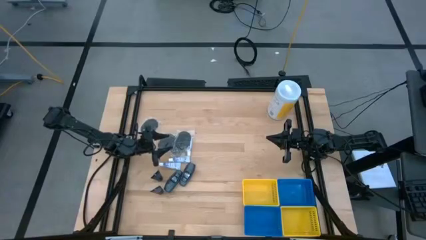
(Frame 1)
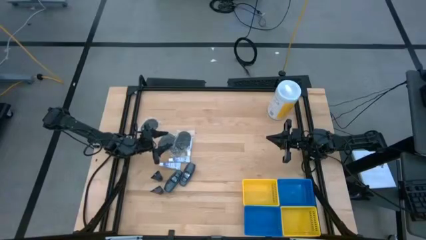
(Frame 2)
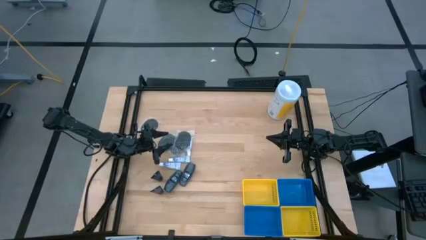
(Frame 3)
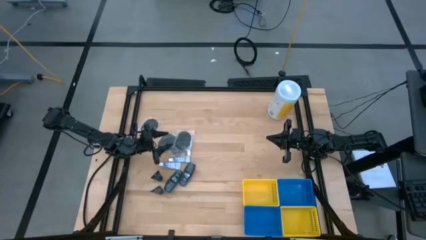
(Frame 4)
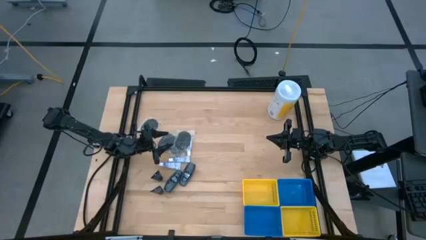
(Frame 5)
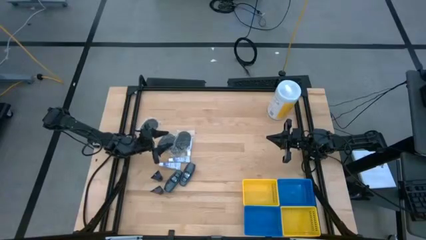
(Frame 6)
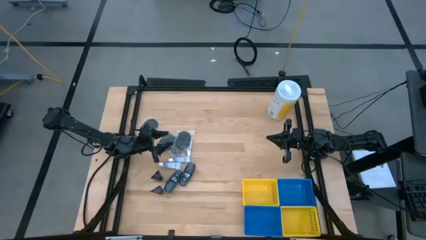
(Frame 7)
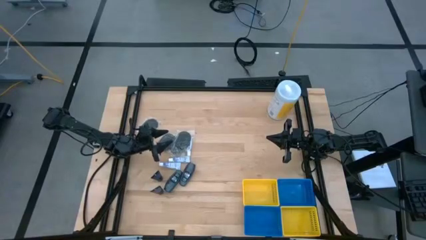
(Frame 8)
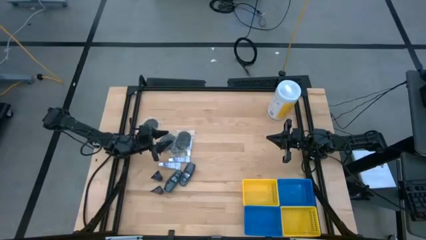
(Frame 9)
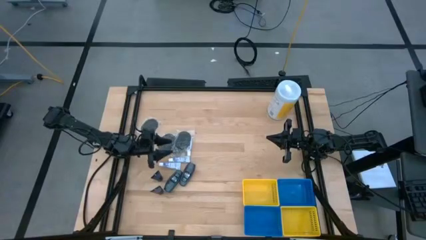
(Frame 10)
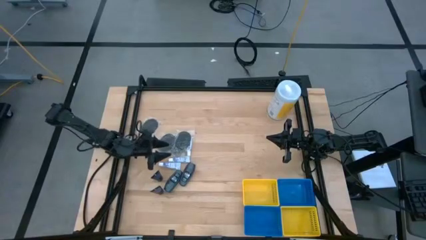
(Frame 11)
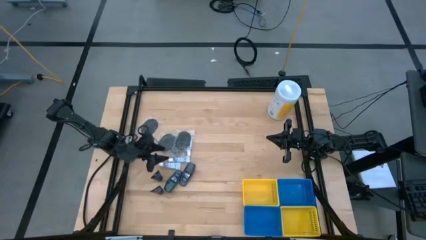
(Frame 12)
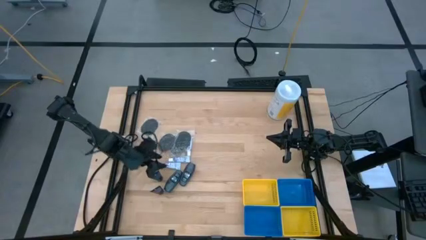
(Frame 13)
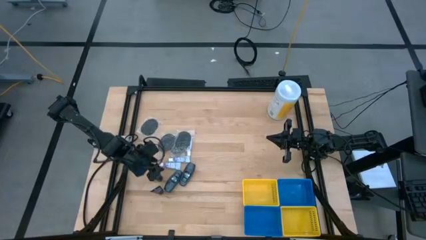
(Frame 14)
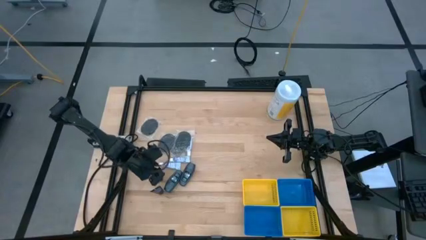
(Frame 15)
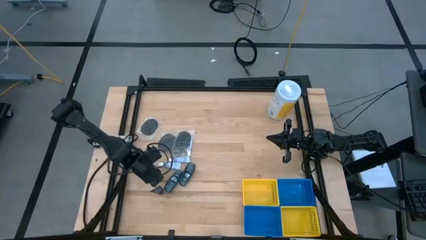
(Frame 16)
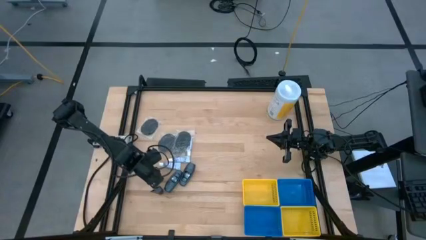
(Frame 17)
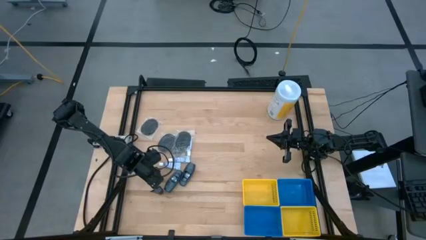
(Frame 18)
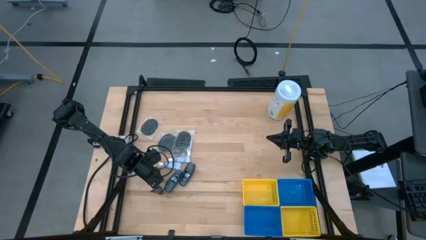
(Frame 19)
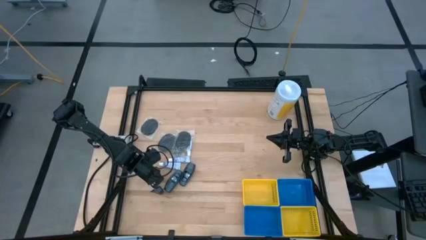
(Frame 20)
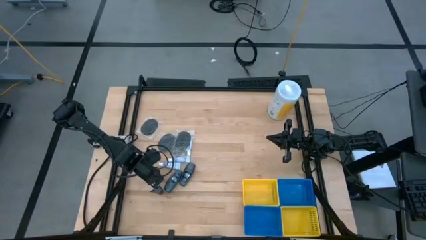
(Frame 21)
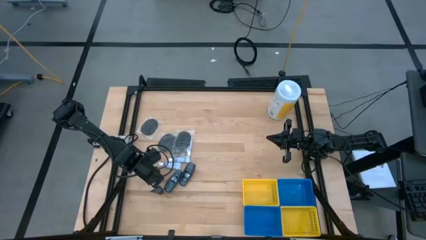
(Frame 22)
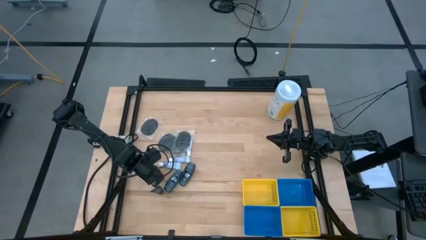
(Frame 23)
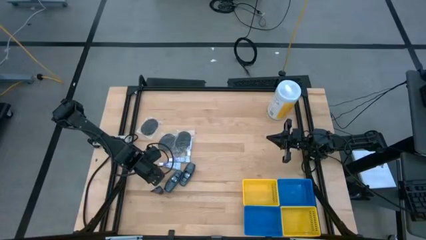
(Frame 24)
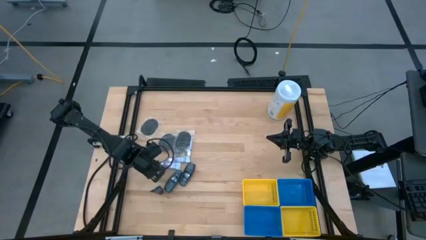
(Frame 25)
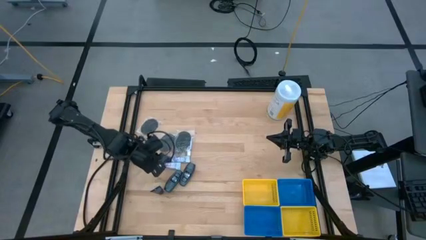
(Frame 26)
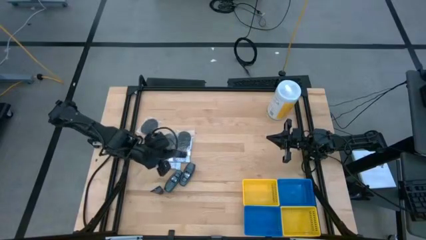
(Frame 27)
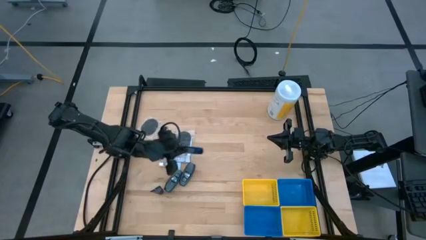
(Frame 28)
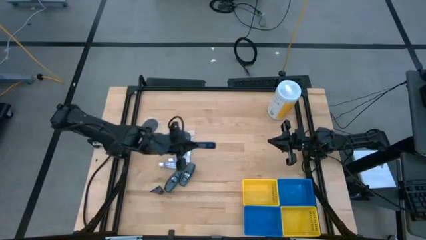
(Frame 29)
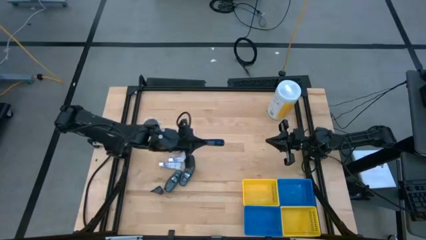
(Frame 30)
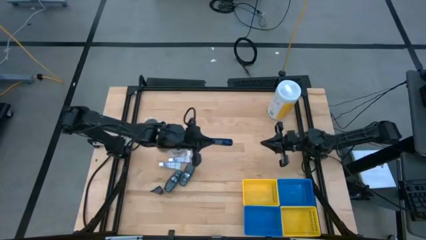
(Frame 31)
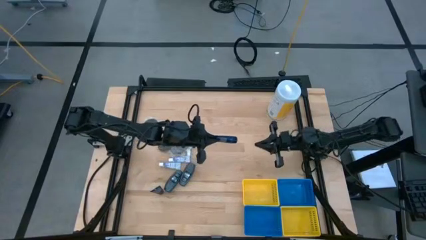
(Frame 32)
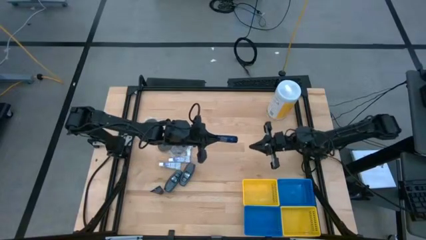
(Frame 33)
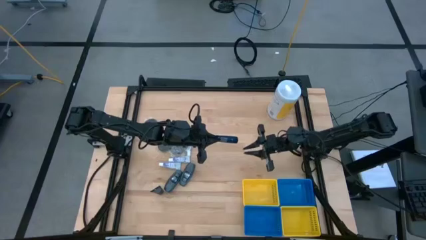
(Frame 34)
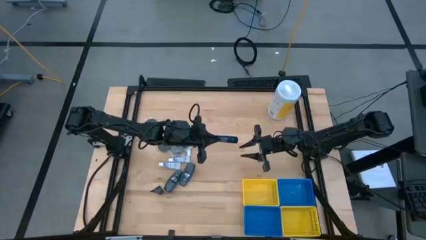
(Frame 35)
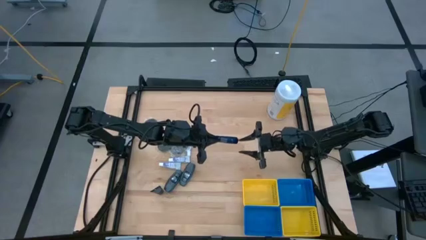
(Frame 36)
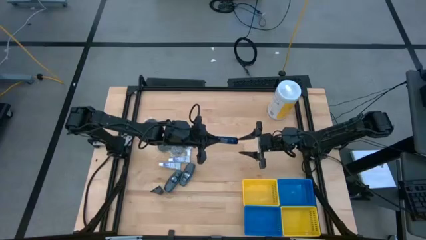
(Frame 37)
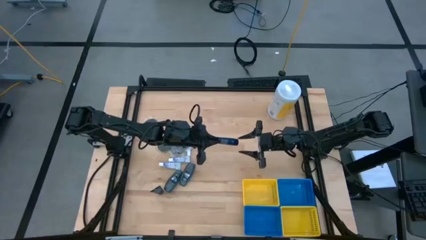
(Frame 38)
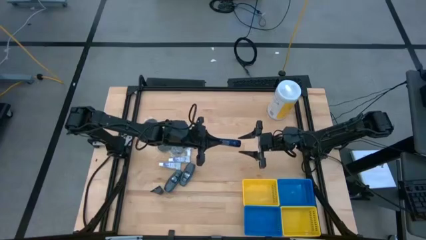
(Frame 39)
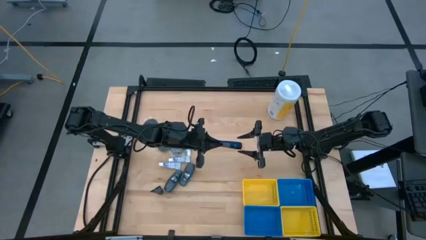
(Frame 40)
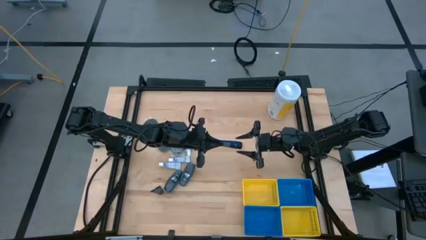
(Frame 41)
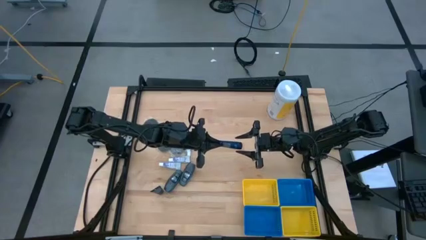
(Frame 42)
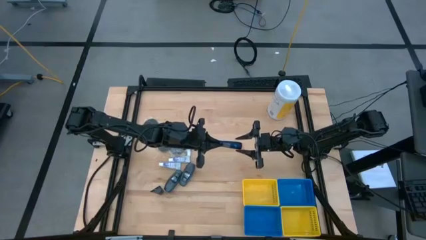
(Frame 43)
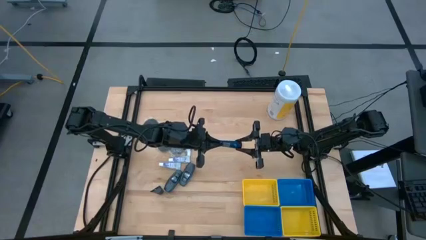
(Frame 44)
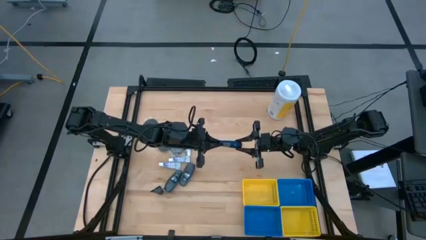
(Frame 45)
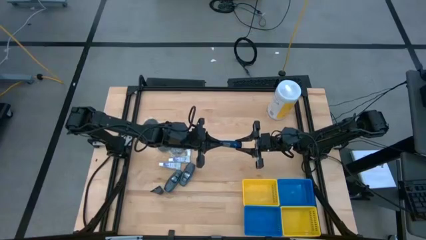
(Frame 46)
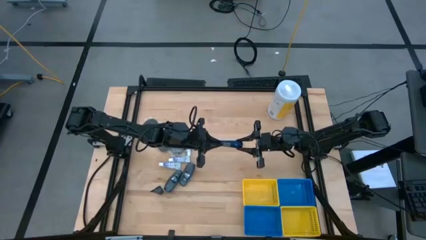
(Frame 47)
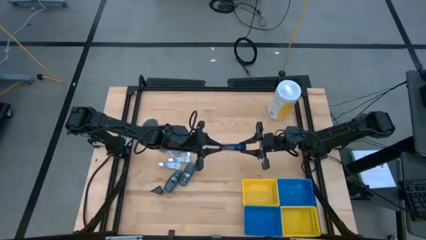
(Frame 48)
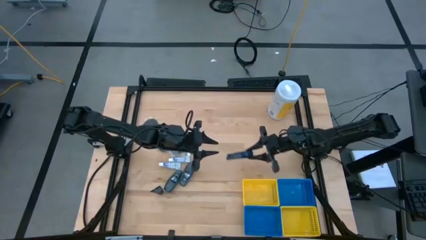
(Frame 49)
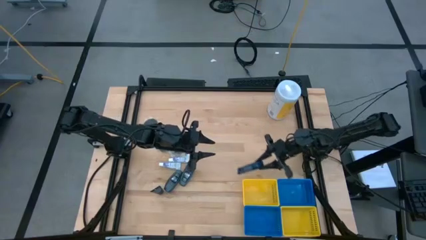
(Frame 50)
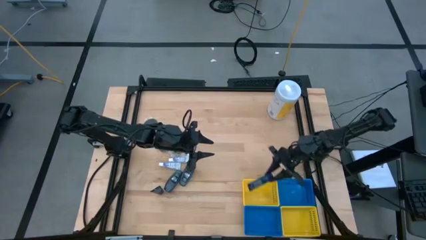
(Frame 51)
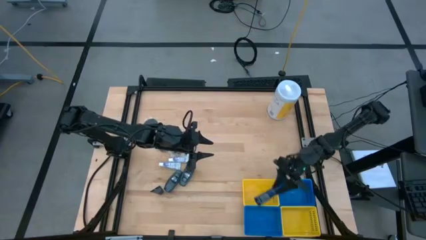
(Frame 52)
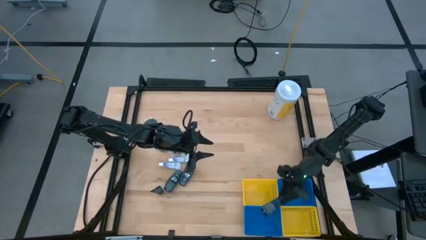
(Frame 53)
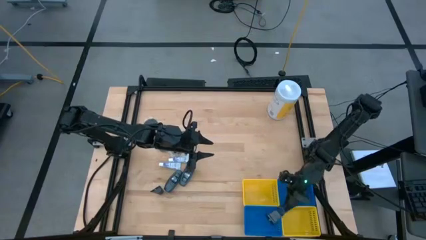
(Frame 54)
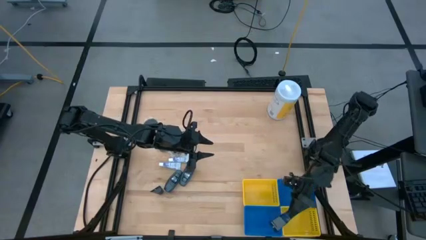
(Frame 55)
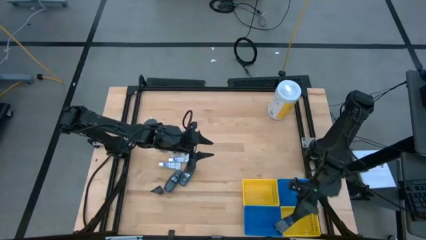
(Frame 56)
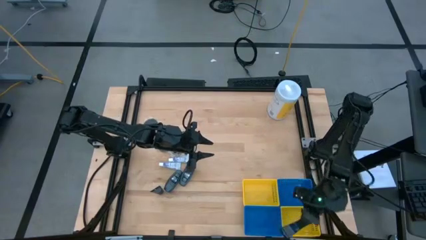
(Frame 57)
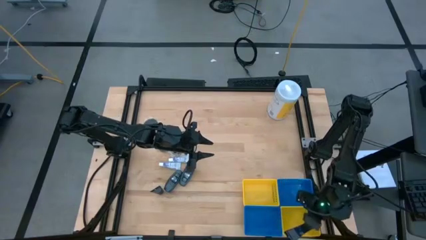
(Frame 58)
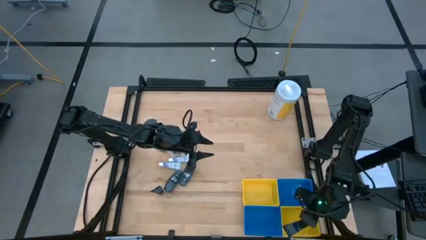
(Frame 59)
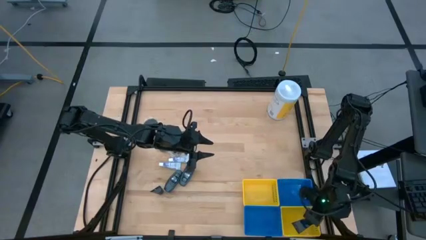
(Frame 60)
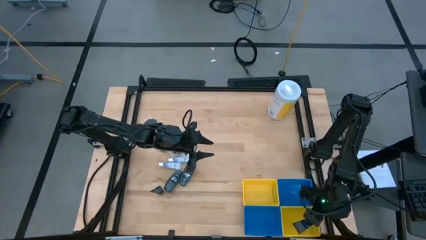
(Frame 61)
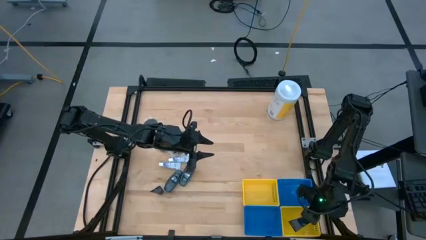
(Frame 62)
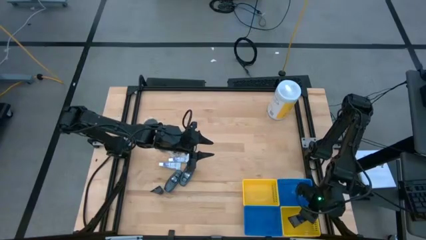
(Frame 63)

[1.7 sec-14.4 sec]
Task: Pick & Place Travel size toiletries
Put the black shave cream into the bottom yellow bin
